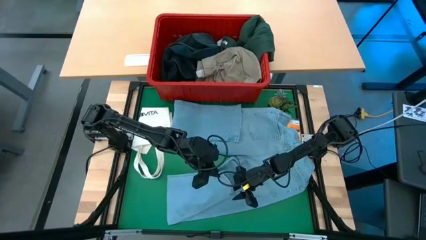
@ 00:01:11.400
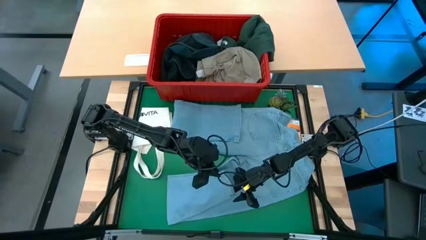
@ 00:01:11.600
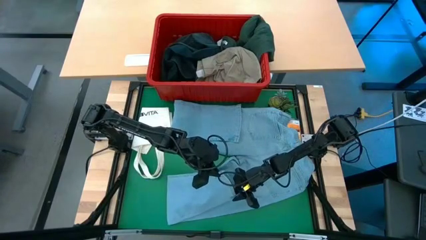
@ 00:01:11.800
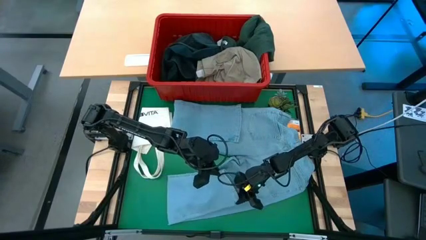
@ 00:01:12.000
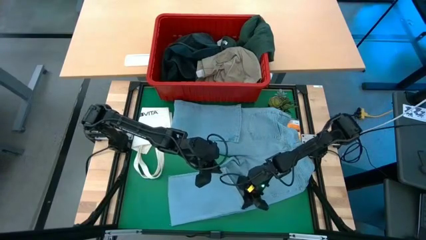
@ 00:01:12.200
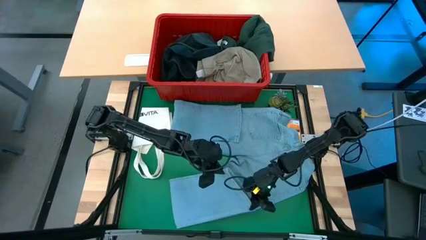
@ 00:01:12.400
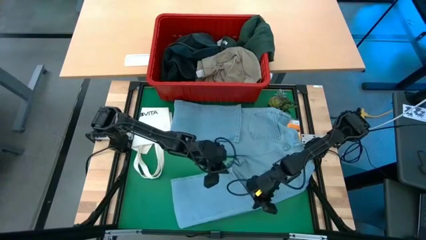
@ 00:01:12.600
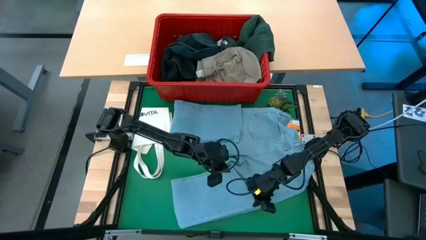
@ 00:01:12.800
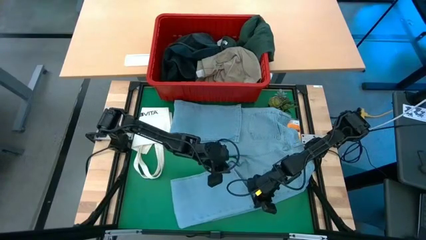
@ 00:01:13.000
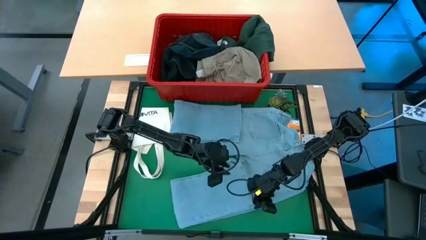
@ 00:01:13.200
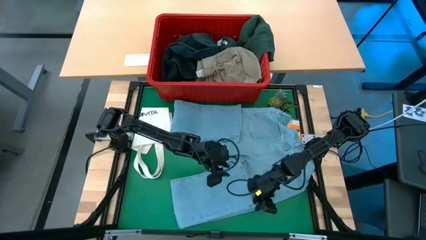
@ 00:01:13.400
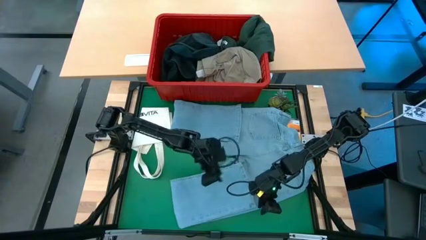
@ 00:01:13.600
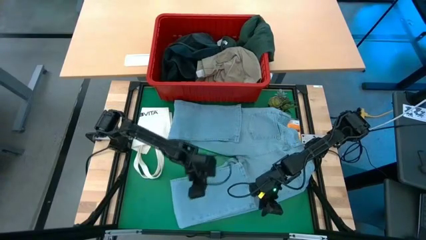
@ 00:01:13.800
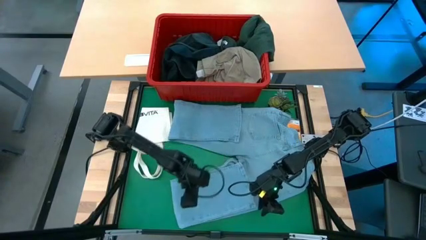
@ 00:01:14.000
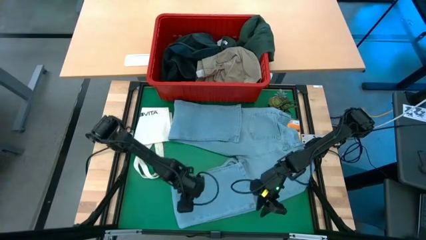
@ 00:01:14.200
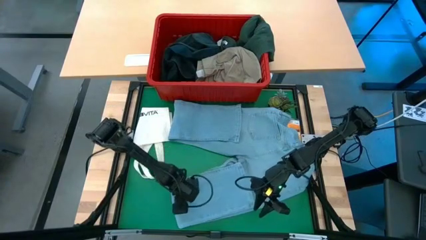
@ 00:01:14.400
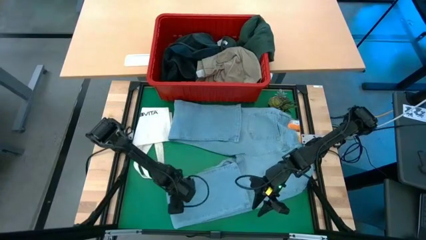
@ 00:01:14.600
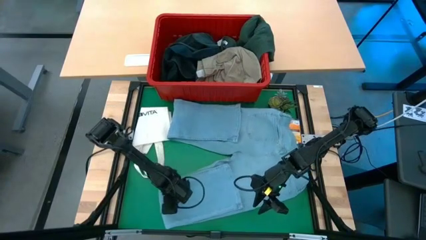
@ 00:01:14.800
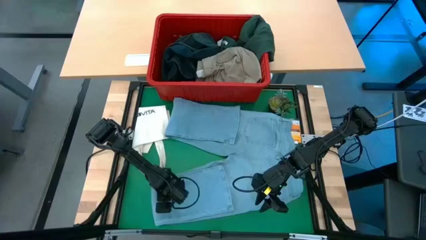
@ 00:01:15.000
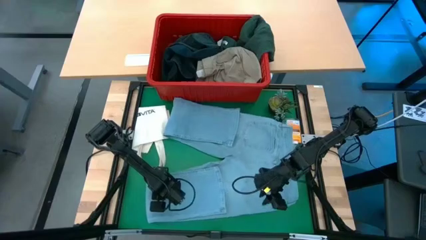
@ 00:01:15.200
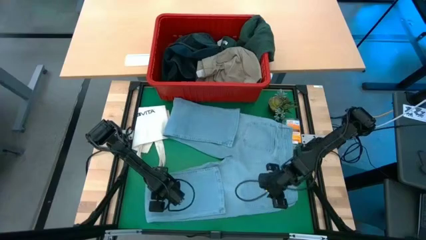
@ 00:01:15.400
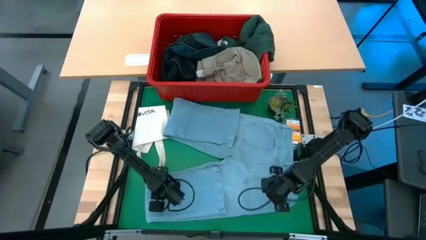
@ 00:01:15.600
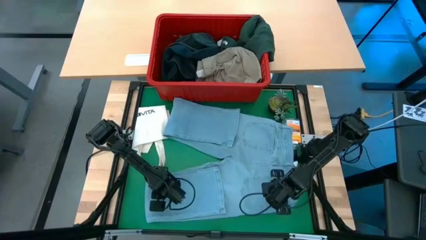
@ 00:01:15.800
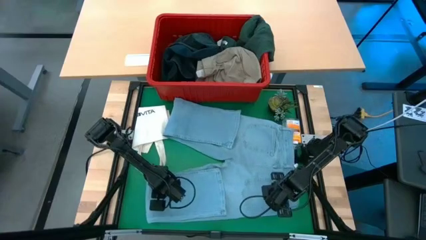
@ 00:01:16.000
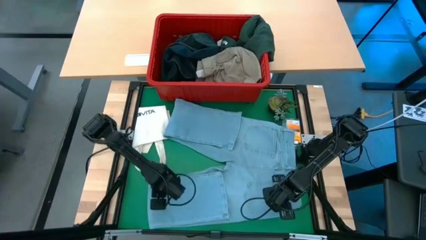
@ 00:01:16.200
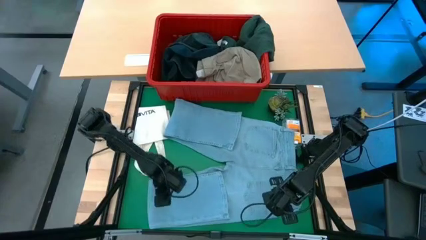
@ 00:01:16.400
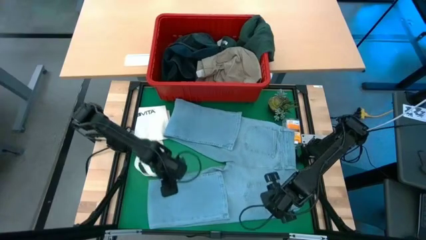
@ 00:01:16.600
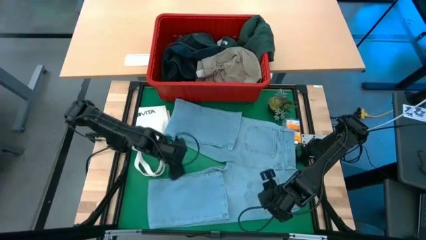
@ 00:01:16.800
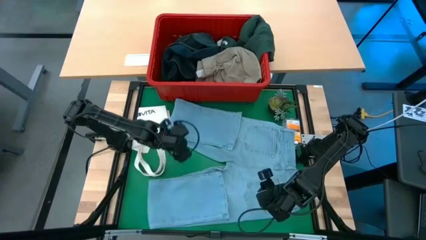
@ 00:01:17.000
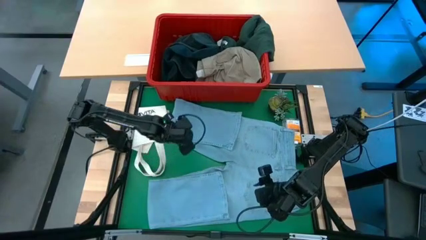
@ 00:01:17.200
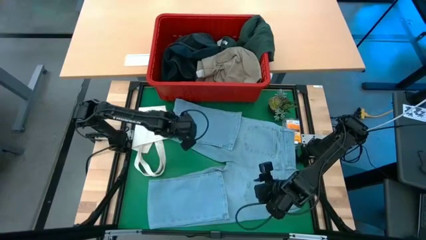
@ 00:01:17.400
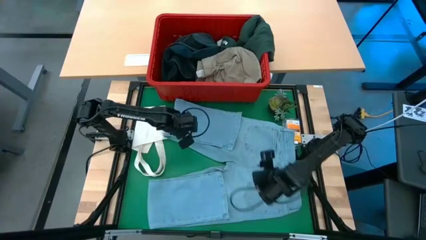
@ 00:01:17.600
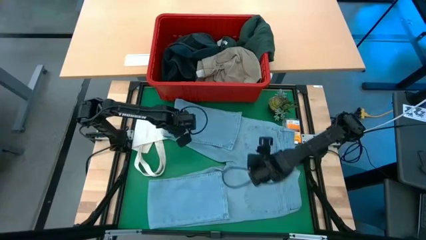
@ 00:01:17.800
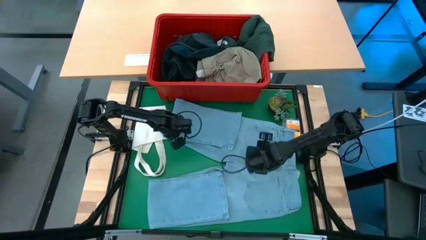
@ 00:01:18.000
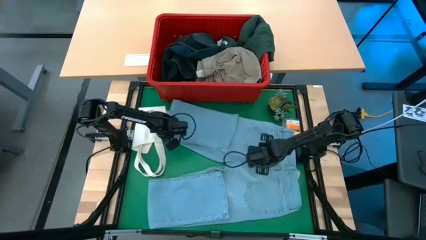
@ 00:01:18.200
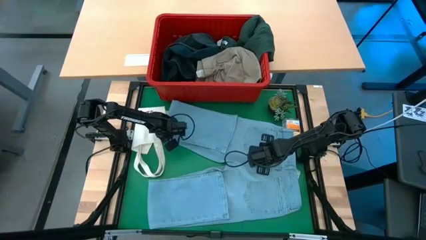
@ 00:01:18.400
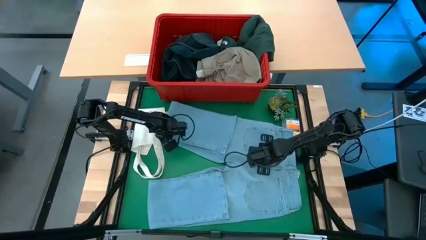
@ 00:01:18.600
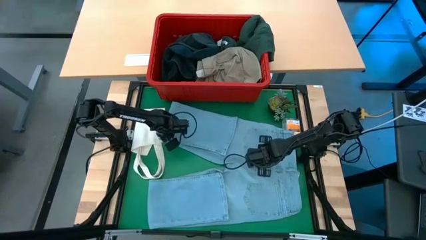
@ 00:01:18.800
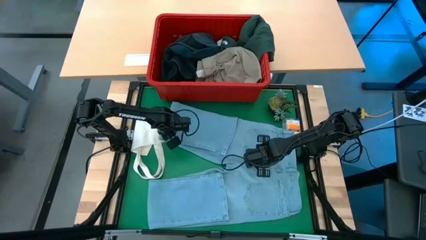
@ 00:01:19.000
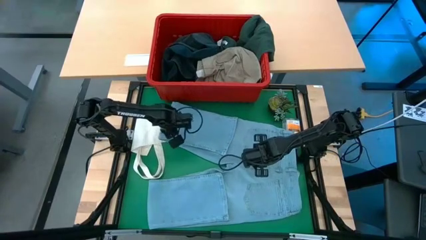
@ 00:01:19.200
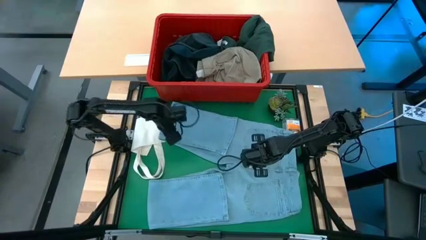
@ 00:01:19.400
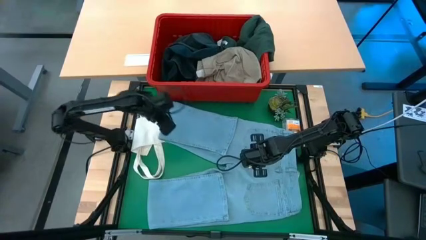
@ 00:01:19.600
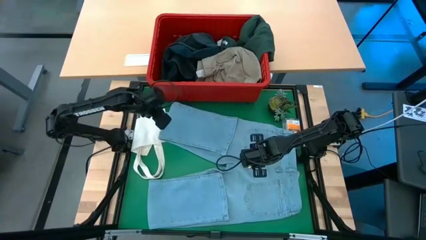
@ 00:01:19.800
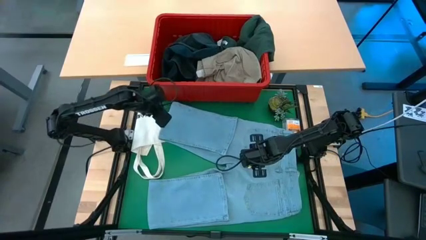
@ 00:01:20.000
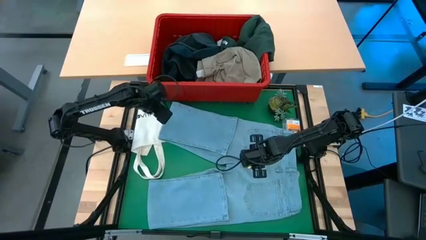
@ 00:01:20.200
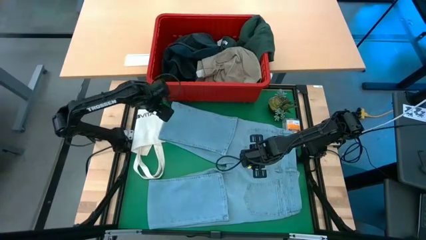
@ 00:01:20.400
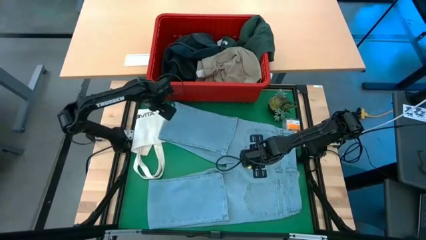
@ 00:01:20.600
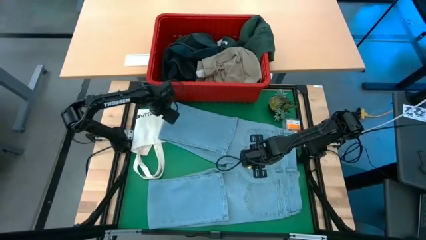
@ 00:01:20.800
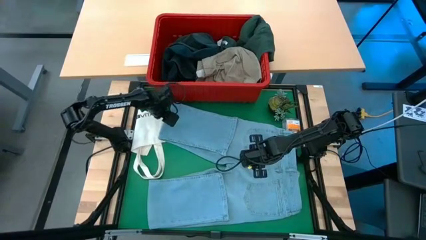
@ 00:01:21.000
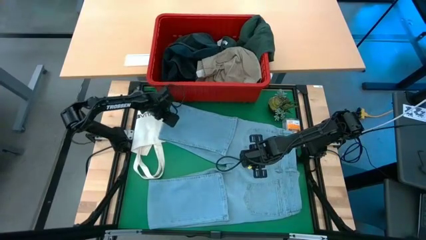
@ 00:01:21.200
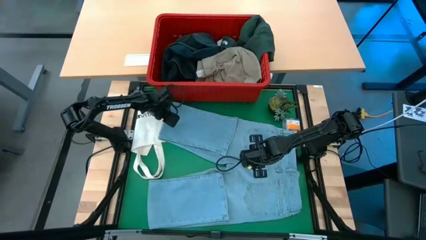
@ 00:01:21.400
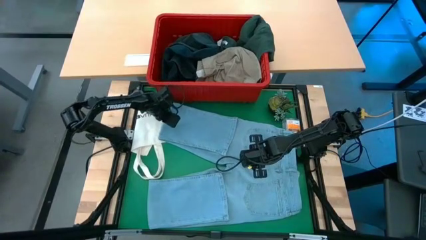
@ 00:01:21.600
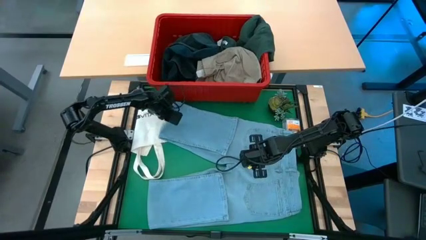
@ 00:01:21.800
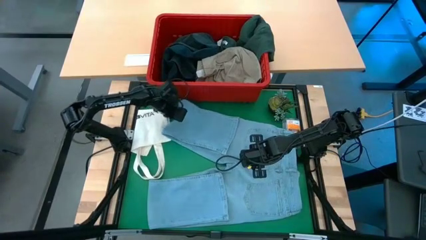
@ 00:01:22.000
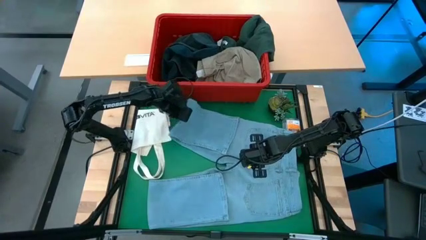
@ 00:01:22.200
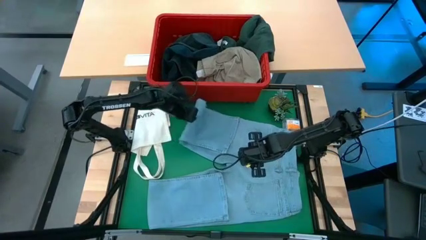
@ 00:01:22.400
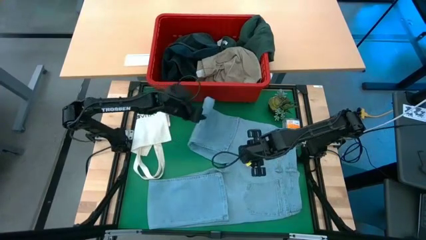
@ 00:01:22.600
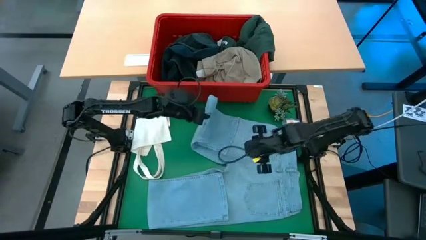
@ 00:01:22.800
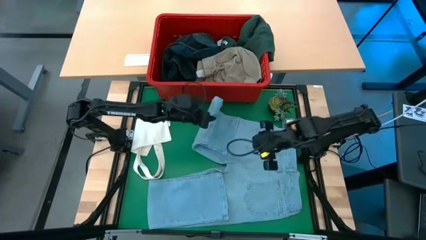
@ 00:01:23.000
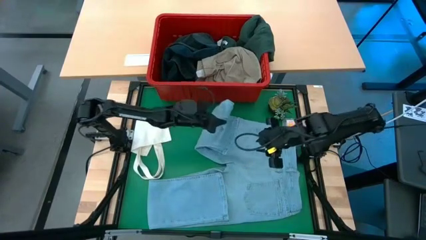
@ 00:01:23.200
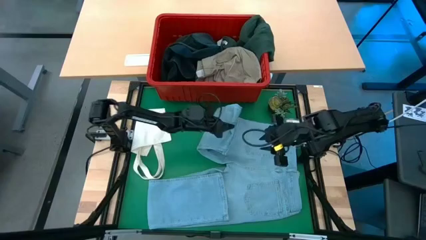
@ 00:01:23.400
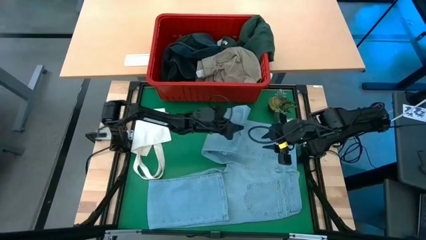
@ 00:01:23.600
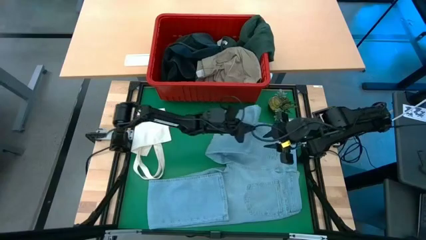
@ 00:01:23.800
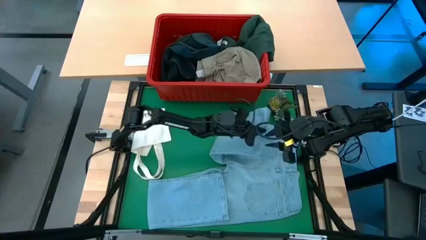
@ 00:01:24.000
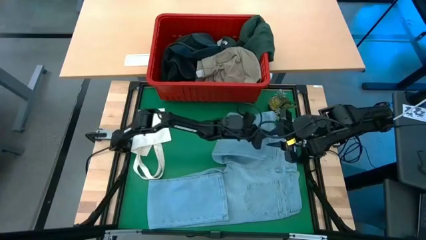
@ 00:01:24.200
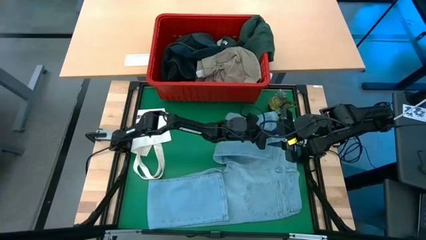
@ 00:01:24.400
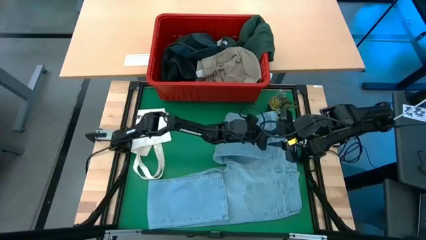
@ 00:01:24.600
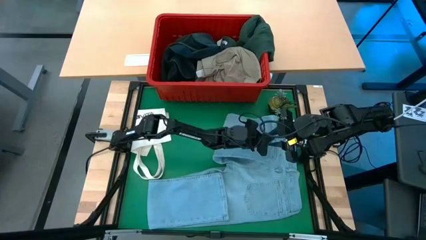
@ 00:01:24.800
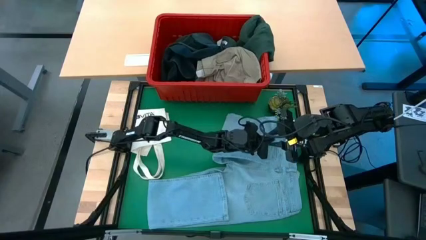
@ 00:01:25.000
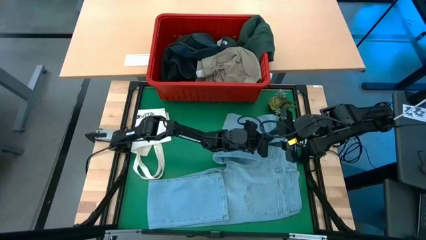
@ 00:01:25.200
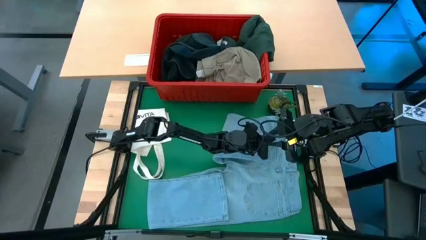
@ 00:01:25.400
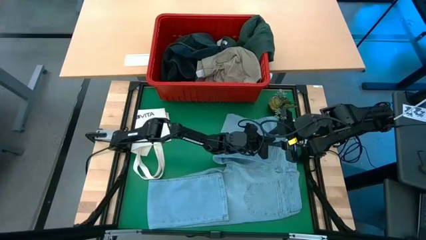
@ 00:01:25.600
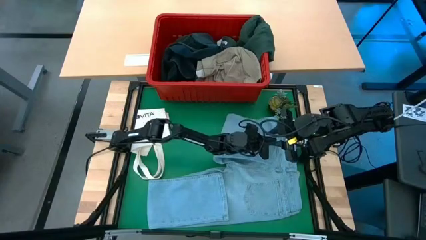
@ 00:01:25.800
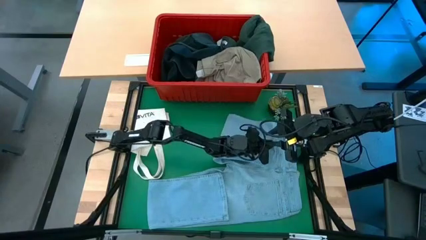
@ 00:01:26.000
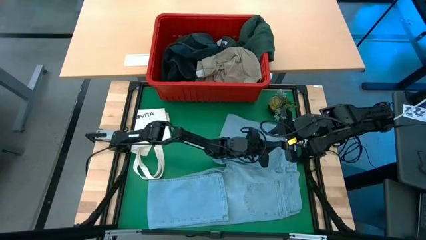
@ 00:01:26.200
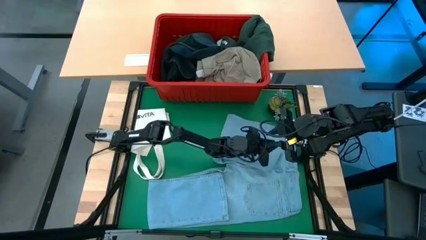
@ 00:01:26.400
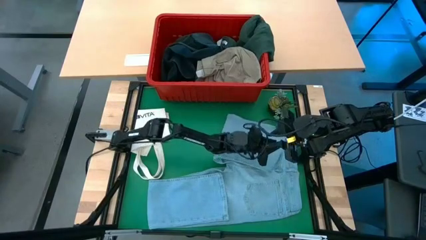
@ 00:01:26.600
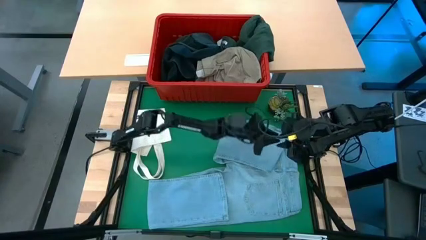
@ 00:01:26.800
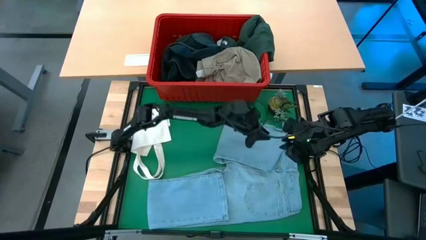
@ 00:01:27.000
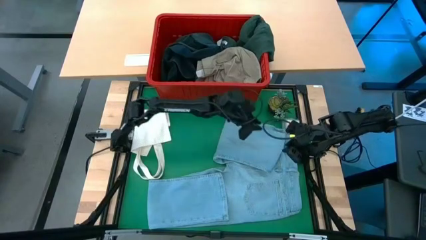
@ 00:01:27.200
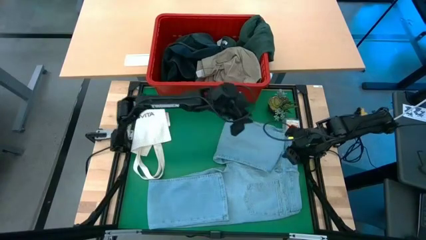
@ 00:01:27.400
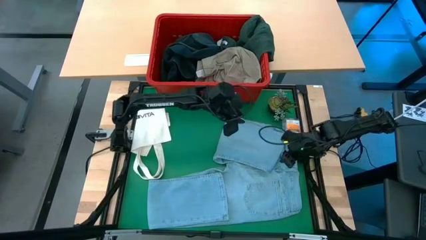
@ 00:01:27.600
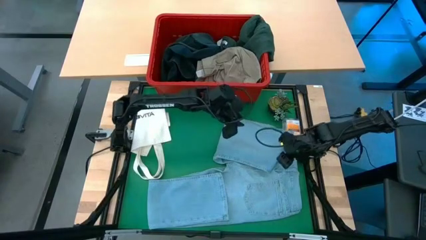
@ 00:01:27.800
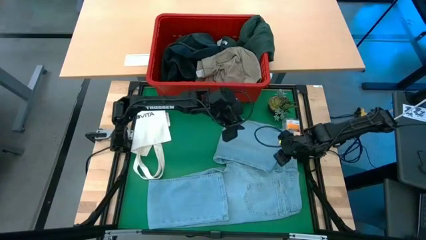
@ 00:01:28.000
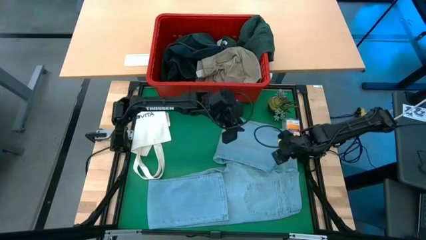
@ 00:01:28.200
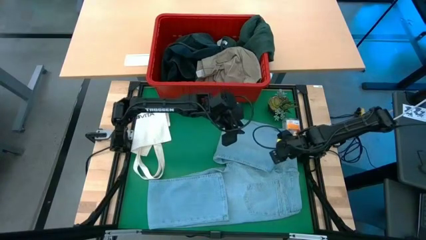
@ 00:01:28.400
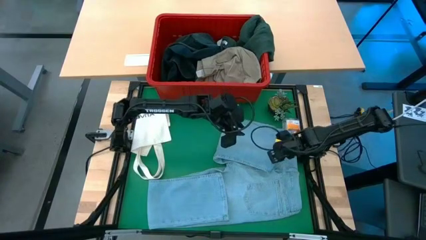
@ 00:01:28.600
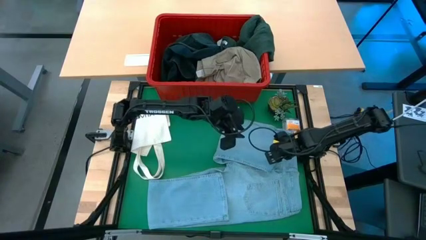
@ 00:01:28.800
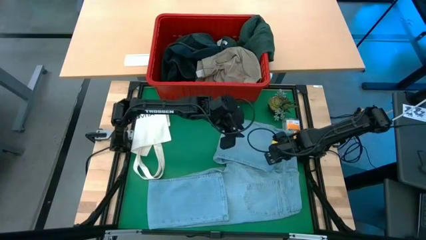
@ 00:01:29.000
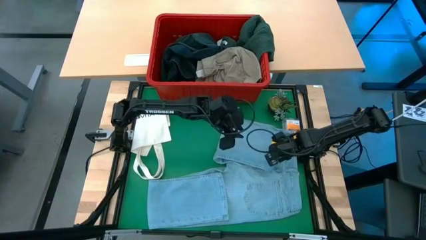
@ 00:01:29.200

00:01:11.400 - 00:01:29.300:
Task: Fold Laundry from Bin
Fold the light blue jeans
